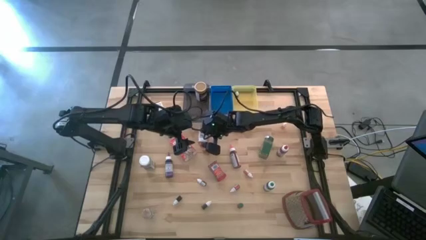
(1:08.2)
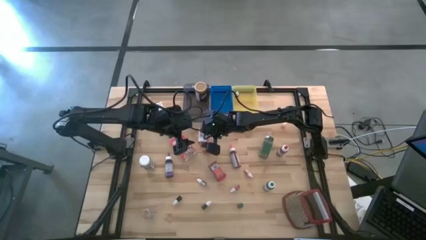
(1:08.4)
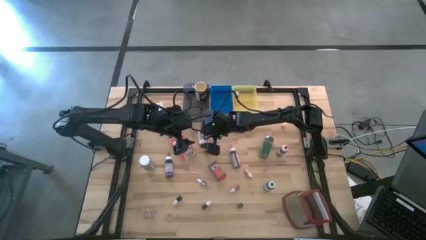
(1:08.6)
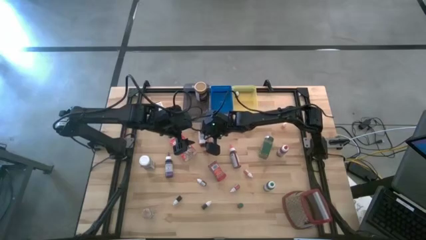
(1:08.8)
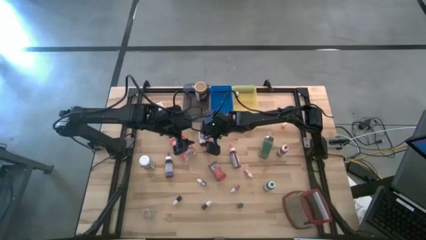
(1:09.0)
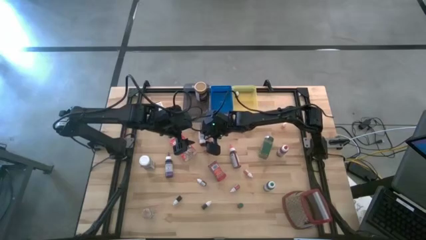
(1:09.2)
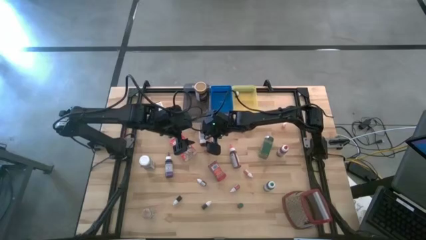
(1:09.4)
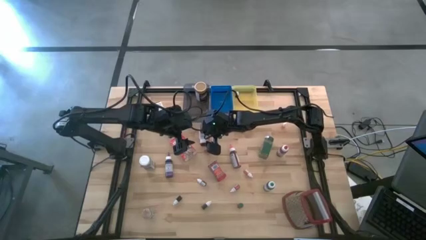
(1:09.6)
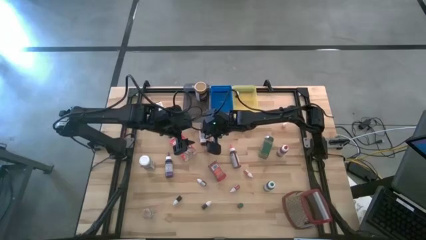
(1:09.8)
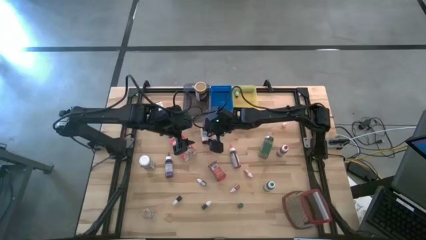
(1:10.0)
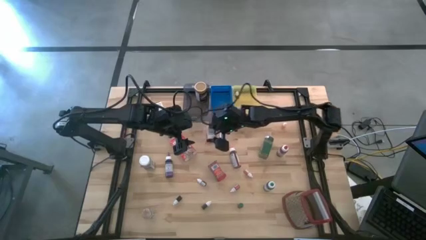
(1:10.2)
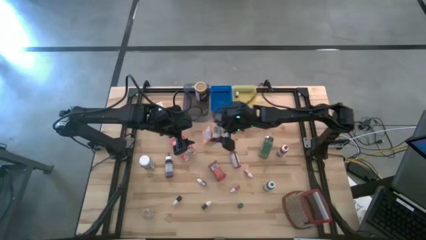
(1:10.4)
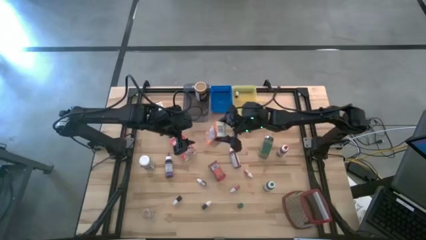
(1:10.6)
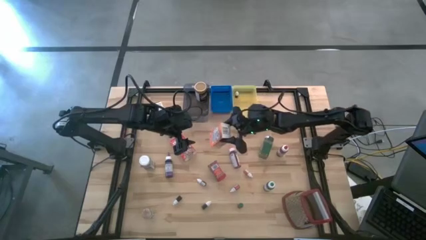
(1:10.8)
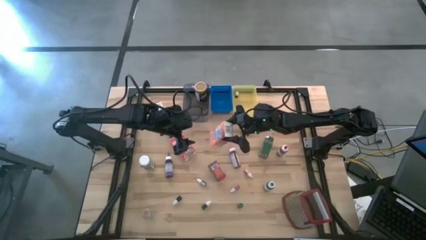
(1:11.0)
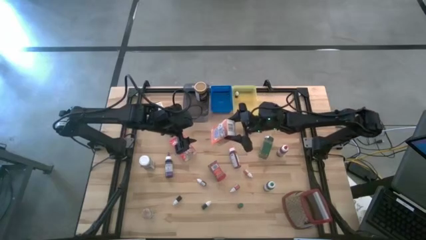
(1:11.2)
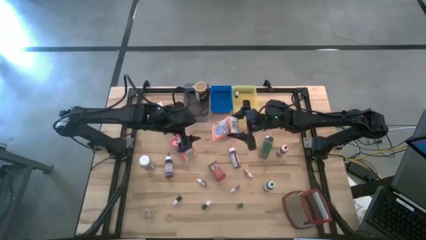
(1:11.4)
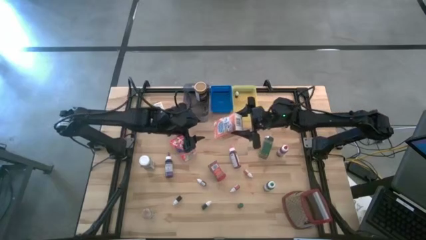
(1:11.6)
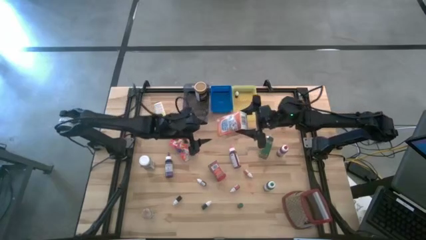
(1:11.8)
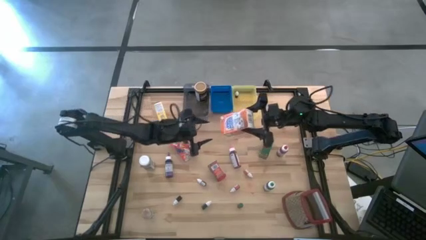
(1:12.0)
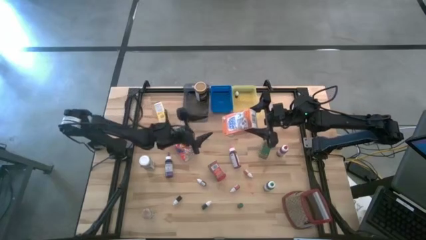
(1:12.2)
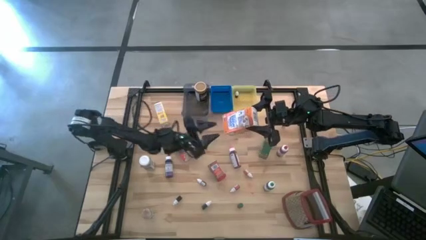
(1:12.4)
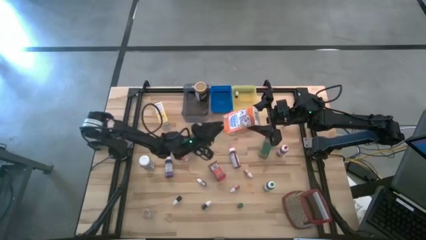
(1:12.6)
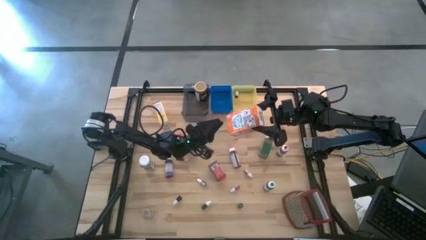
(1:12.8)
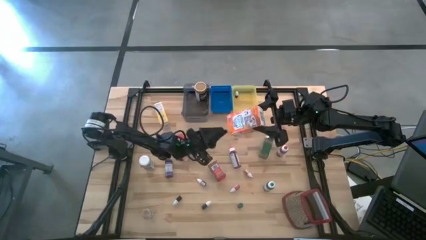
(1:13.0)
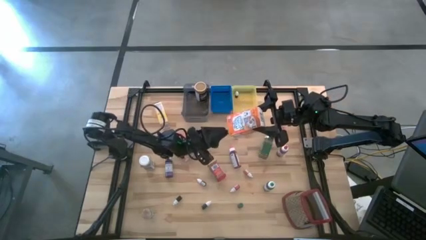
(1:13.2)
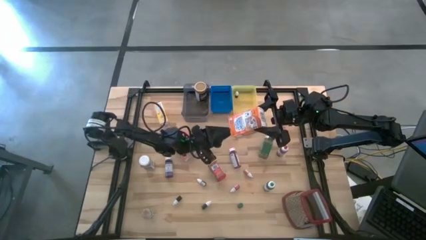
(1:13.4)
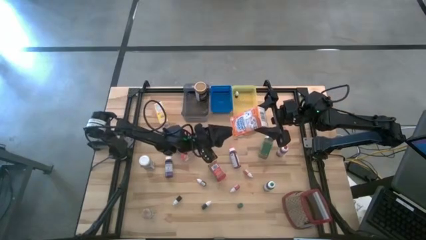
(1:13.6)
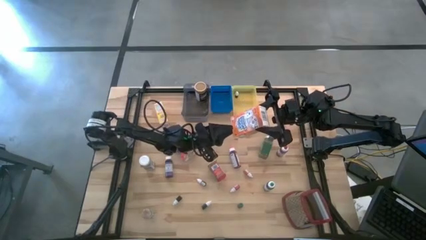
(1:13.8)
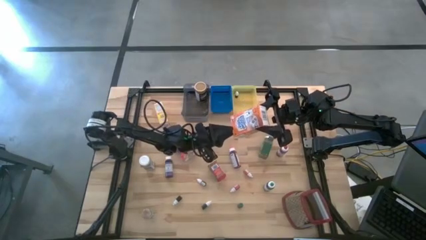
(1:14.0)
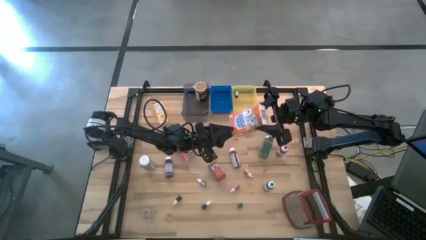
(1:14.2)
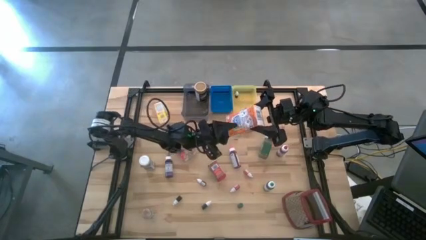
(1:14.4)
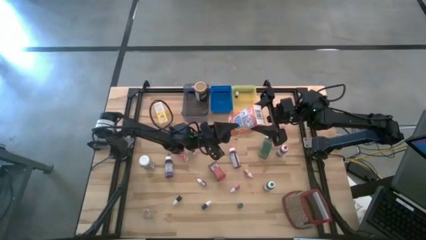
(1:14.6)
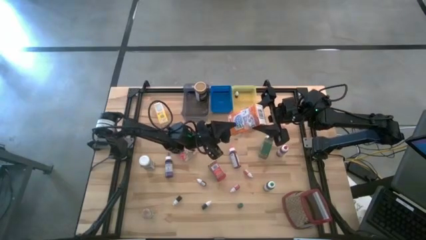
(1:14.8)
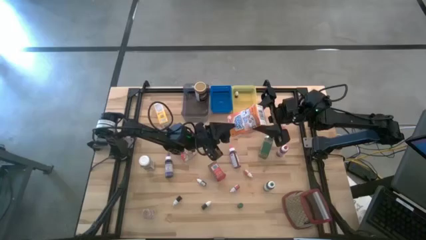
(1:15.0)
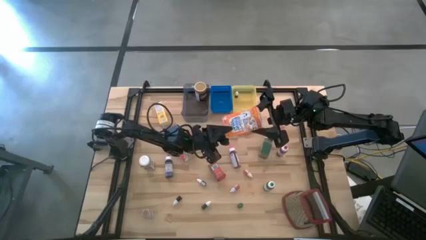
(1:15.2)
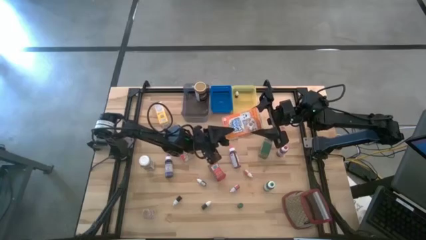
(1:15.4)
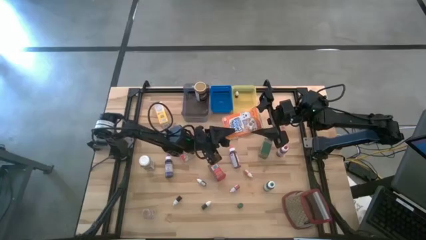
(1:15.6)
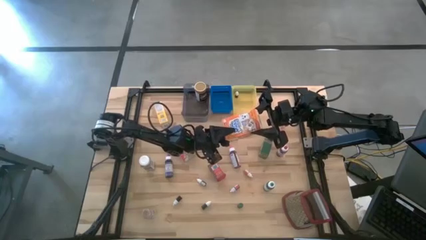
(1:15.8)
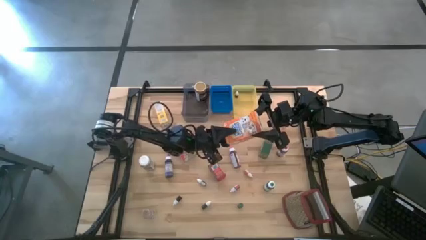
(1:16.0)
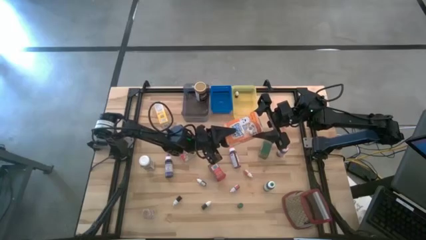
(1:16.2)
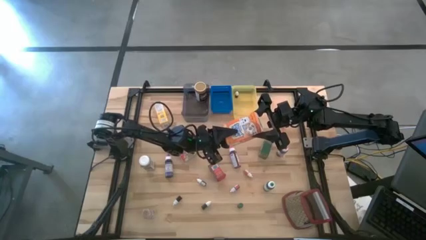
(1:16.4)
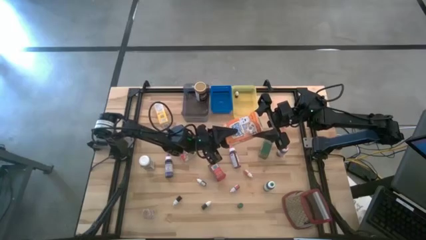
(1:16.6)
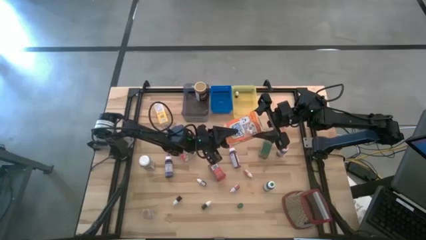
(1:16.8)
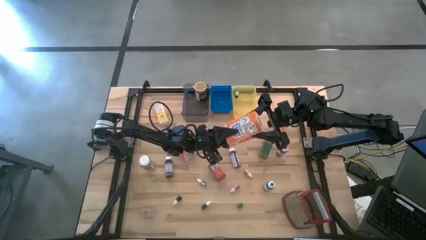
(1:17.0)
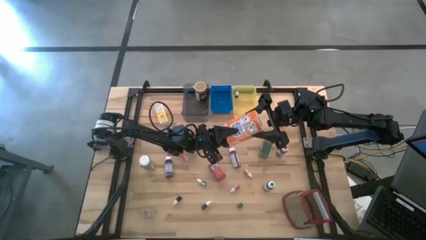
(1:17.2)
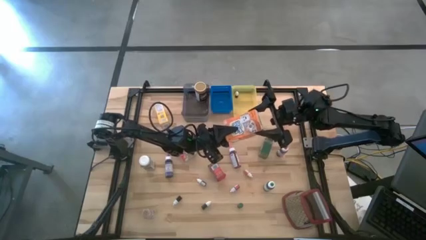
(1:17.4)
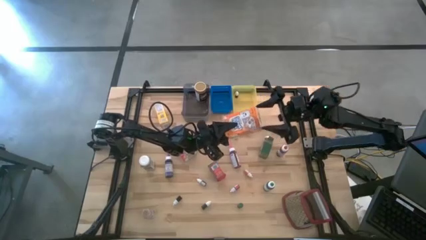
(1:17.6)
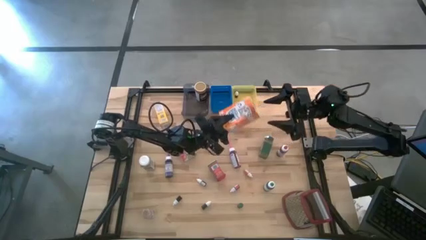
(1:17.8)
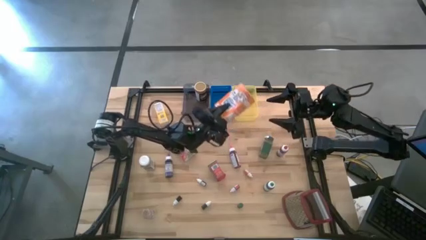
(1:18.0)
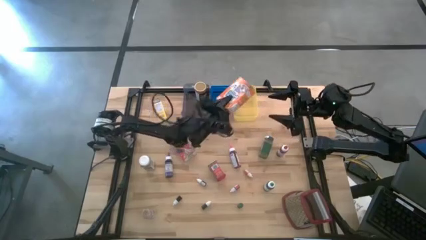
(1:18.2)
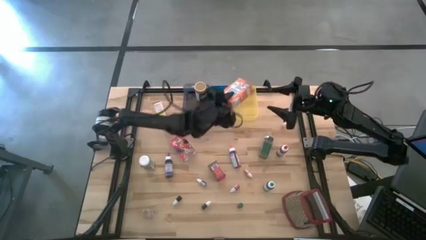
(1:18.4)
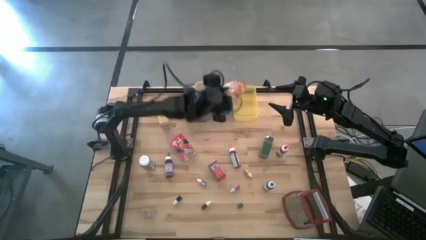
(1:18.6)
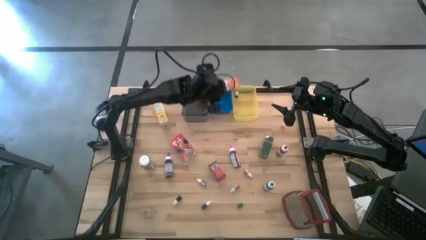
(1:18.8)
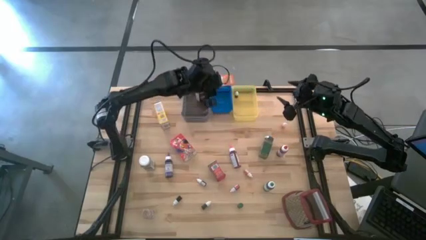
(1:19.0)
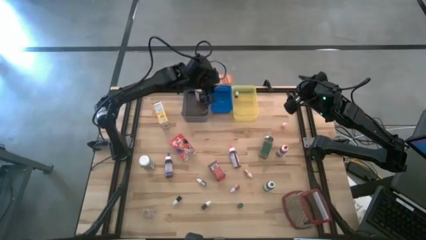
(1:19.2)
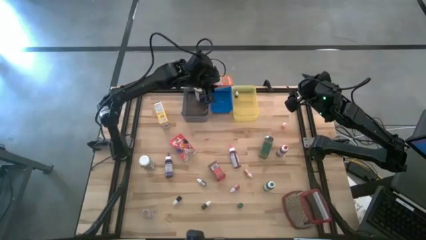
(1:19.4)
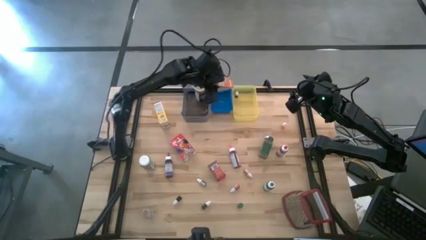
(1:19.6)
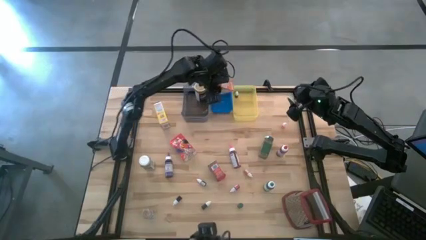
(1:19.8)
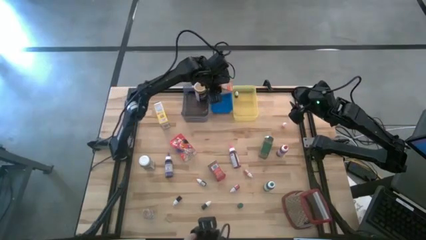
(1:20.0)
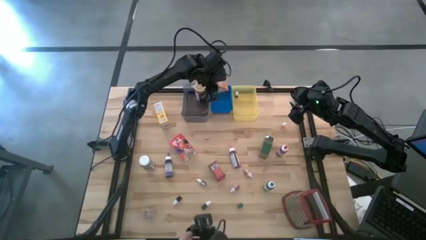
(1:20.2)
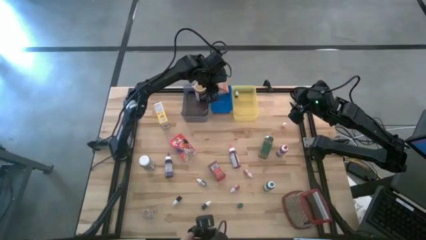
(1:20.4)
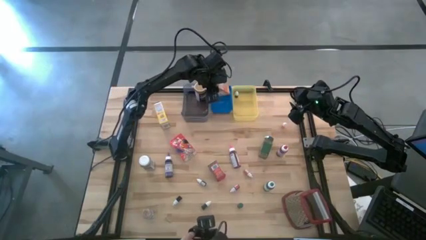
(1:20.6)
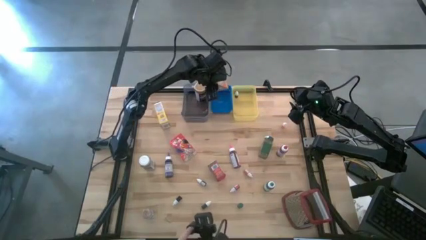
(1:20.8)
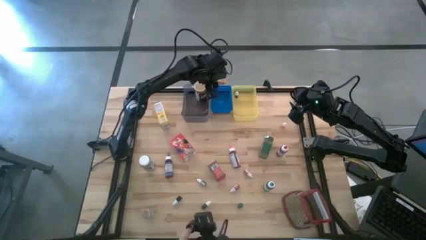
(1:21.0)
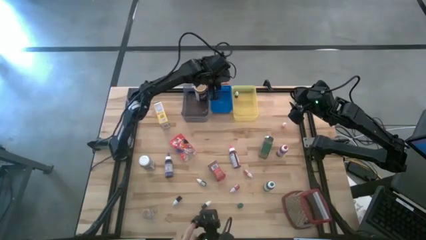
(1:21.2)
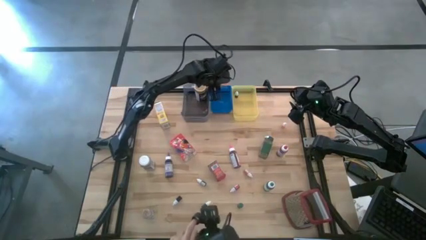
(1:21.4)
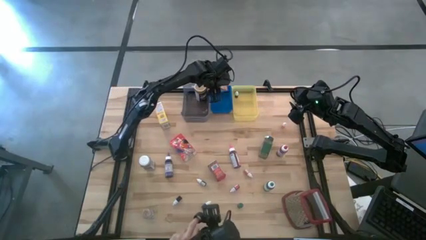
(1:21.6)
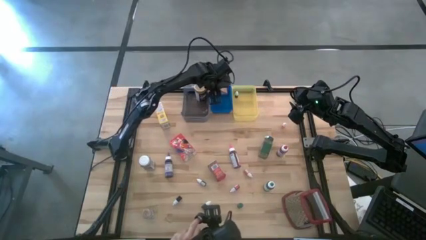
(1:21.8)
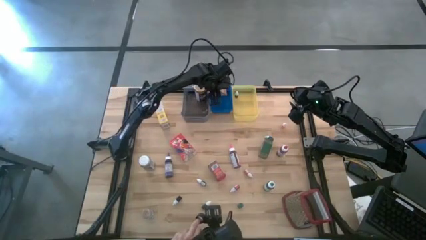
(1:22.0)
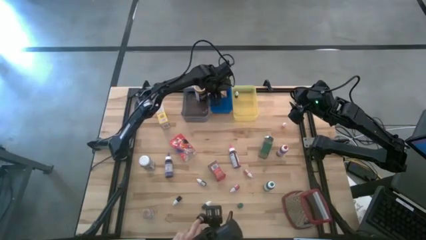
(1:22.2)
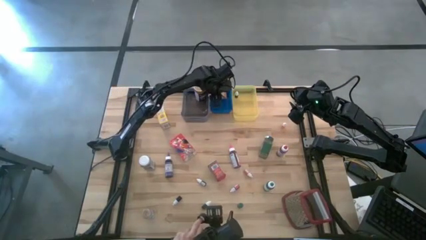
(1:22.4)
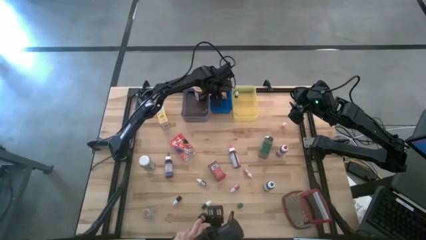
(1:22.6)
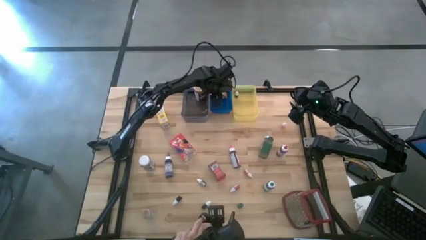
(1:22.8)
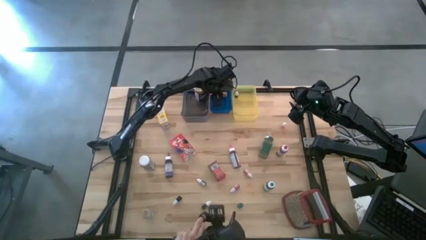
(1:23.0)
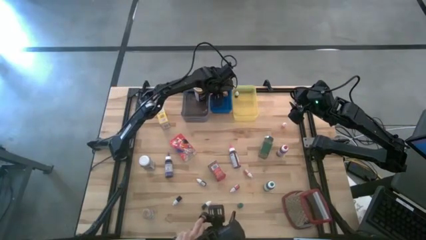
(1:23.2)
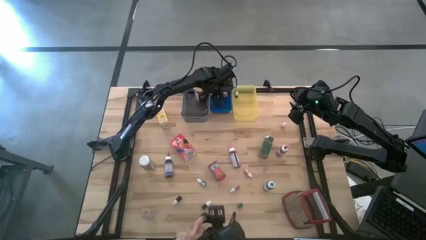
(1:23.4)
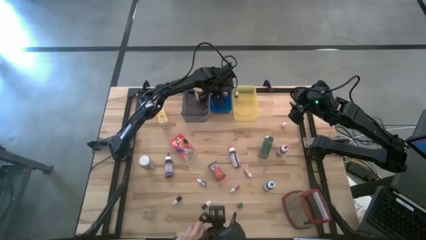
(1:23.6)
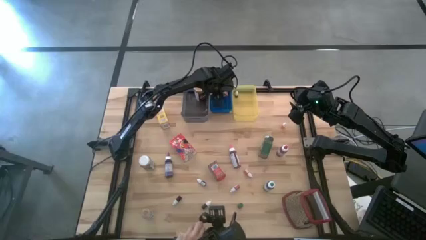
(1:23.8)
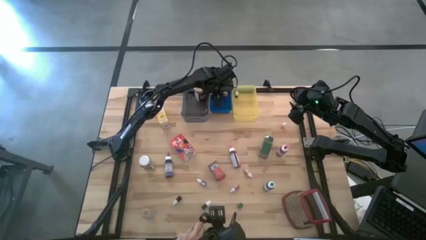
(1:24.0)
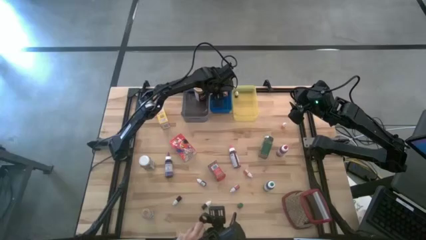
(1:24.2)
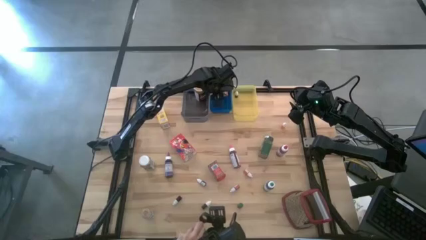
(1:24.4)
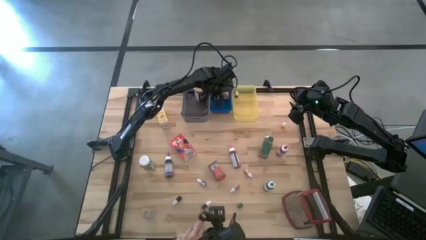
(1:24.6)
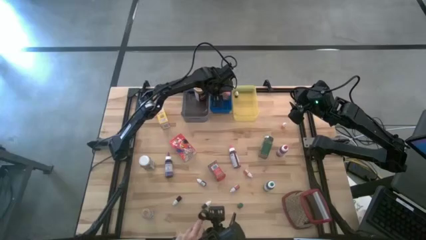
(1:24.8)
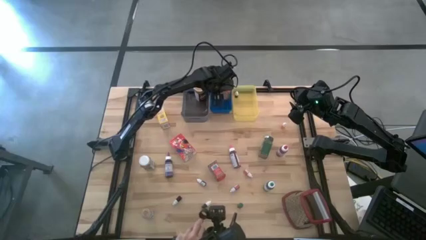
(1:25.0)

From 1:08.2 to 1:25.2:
Task: Pick & Place Kitchen Items
Put the orange cereal box into the blue bin
